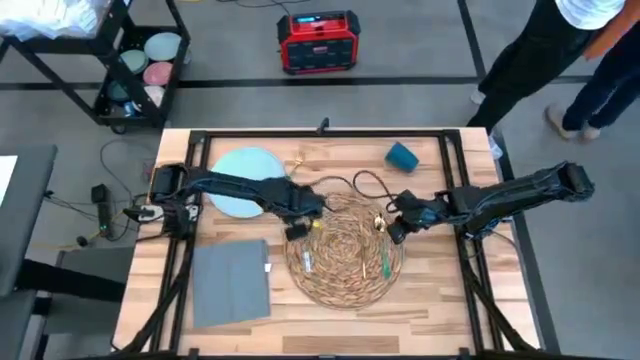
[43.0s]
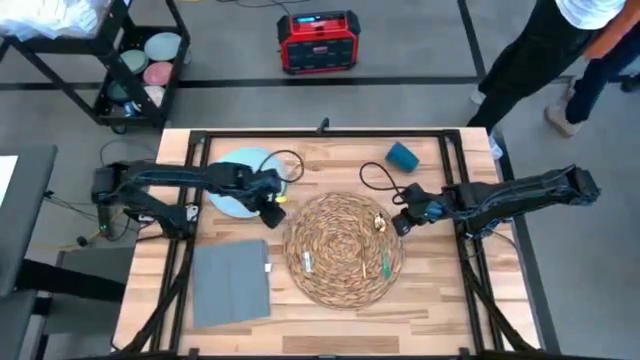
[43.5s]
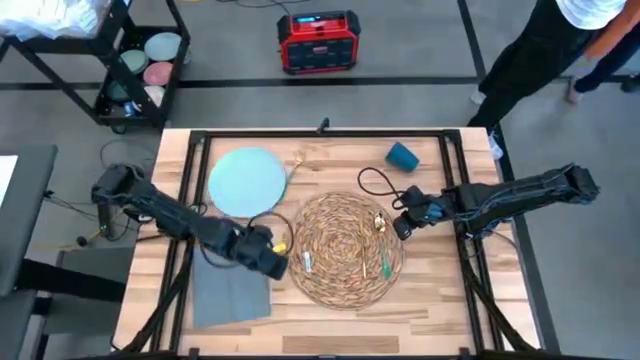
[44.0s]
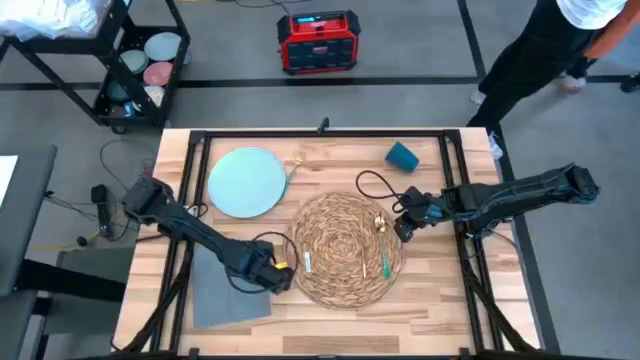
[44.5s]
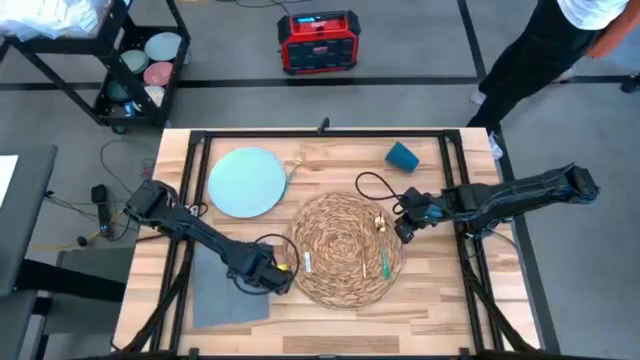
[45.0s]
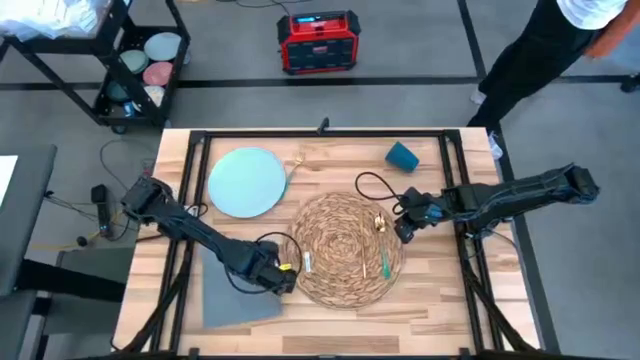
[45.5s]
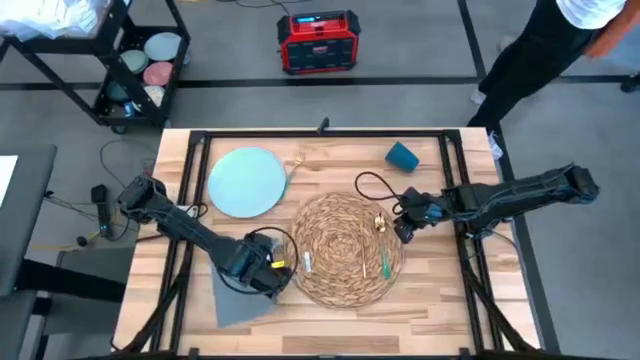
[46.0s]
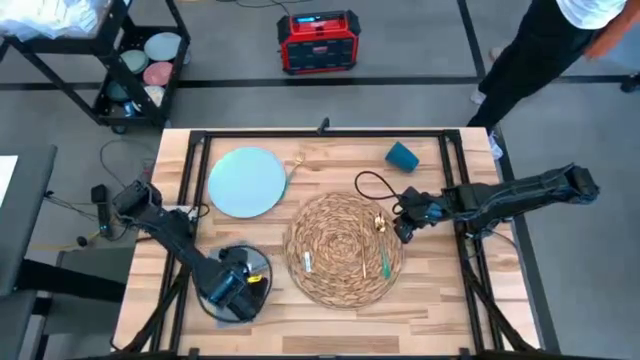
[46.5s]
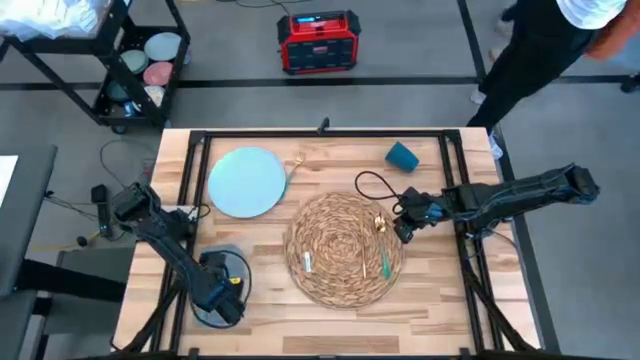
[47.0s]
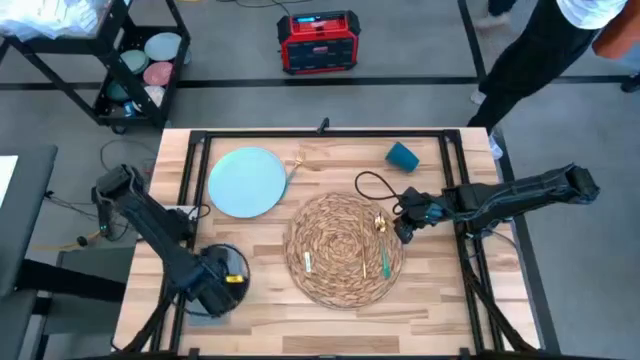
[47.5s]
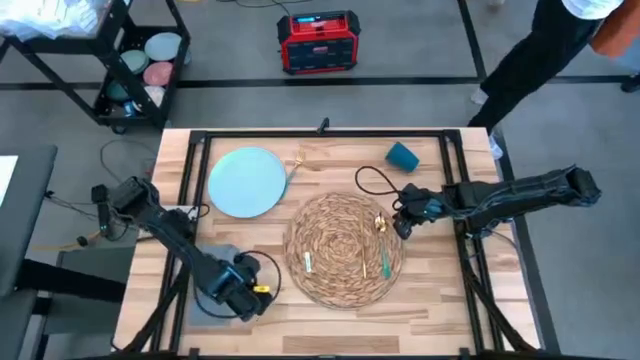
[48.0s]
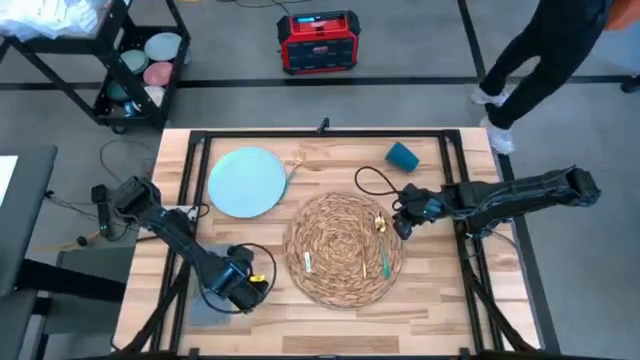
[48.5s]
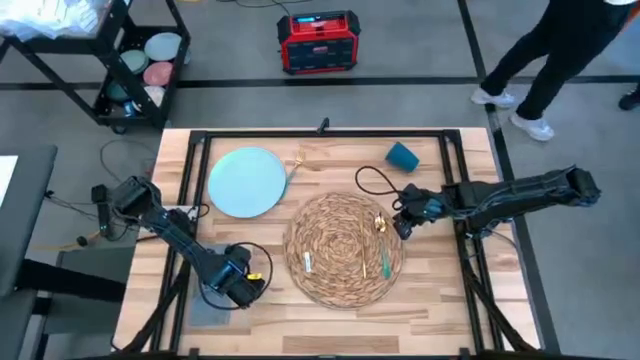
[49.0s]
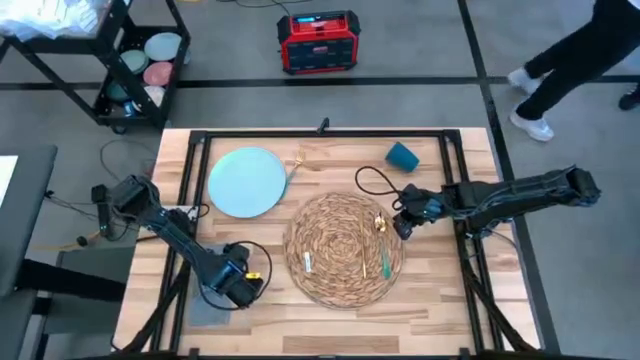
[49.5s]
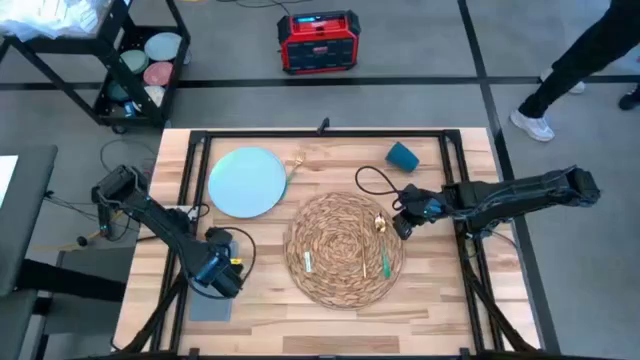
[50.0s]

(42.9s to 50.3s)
Task: Set table place
Fold the gray table napkin

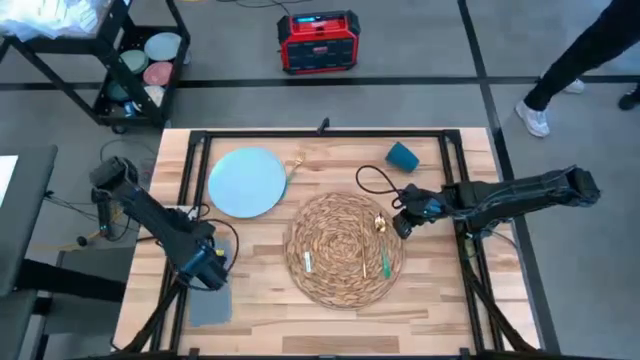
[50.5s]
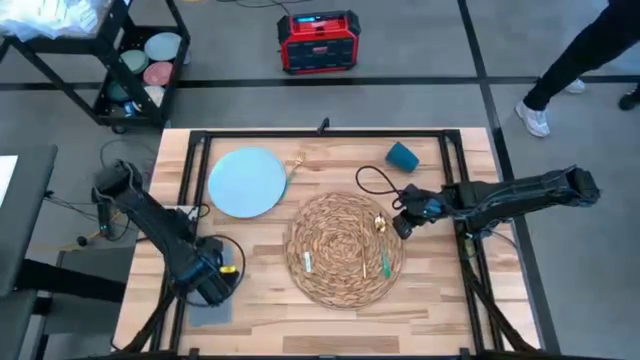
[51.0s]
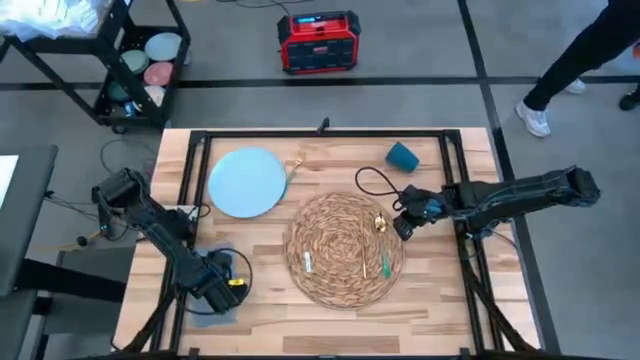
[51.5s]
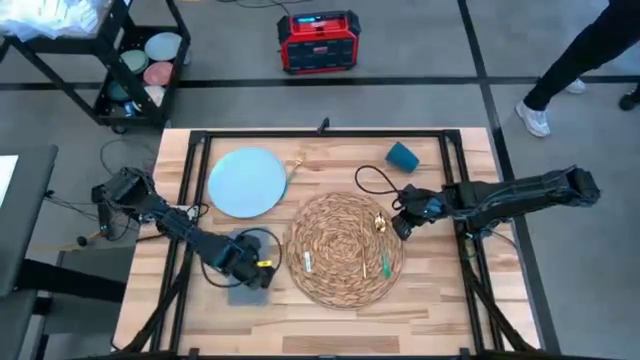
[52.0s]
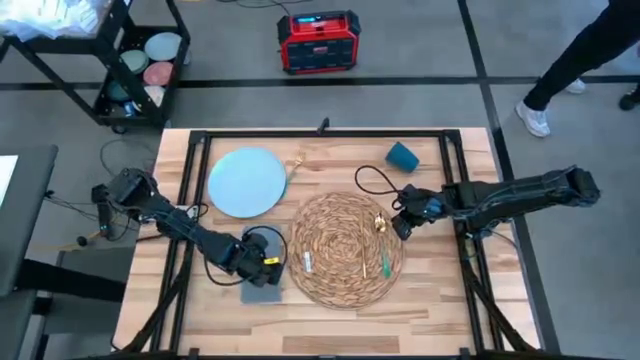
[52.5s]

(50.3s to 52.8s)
Move the table napkin to the left of the brown woven placemat

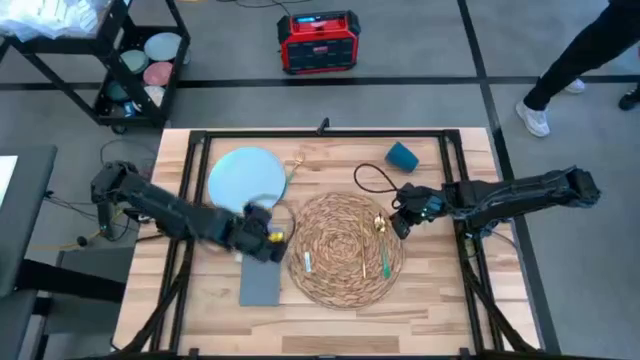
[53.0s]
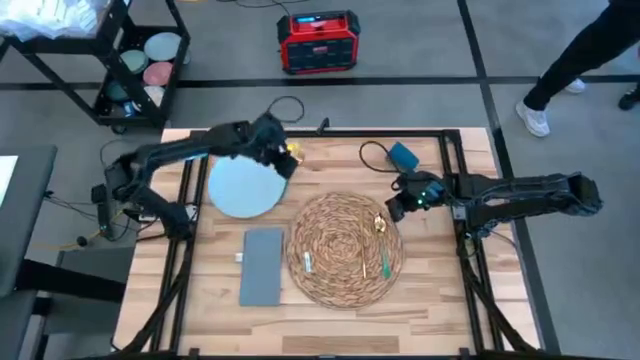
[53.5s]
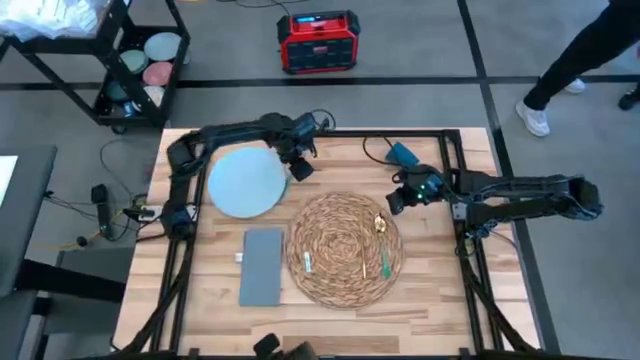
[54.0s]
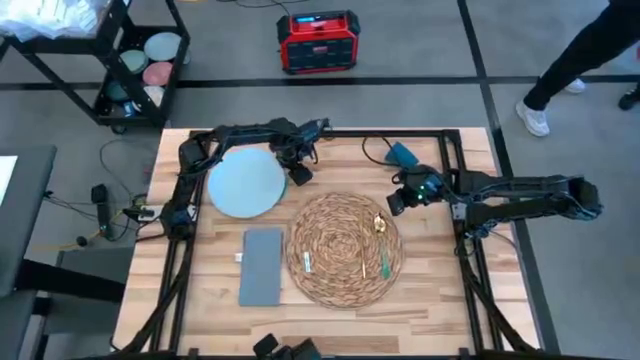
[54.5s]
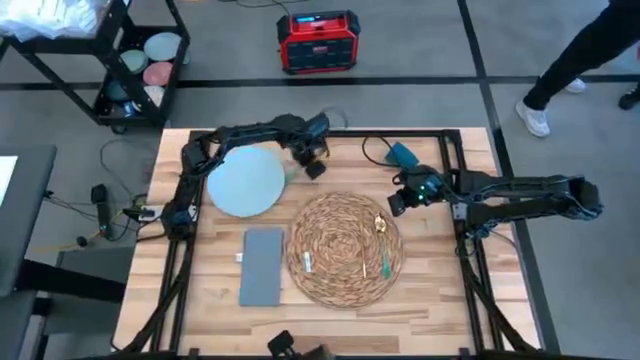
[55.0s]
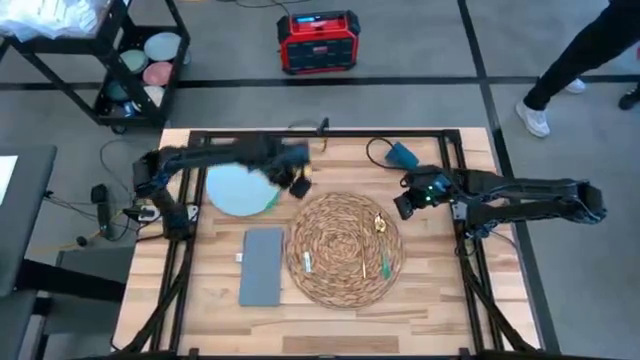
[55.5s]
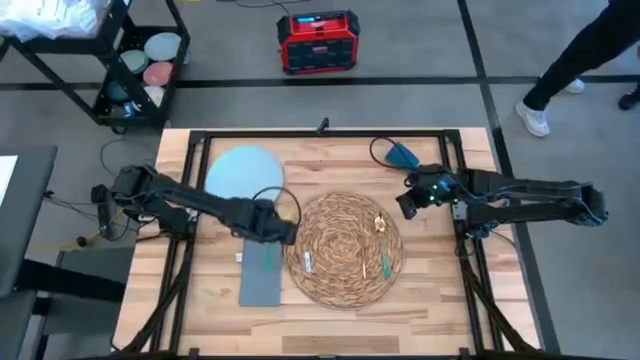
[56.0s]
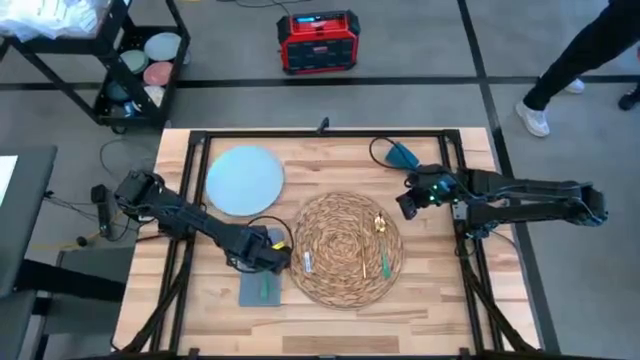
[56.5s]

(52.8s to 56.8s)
Put the green fork on the gray table napkin

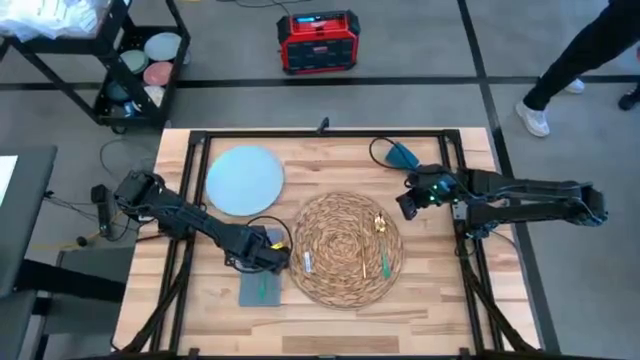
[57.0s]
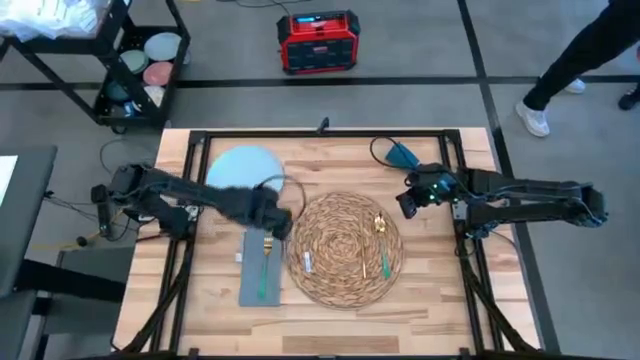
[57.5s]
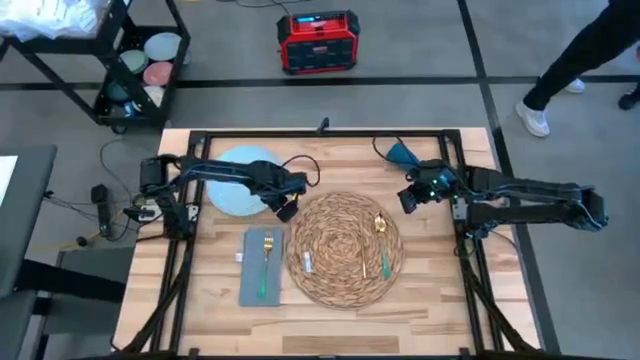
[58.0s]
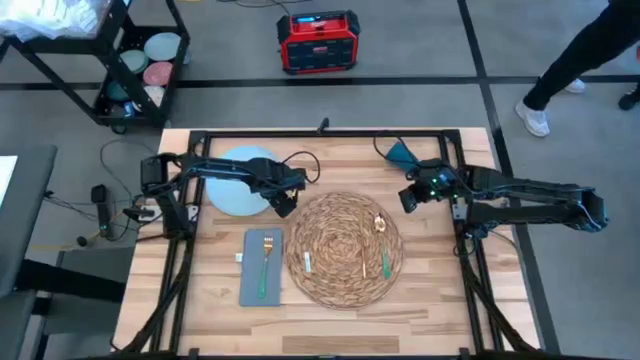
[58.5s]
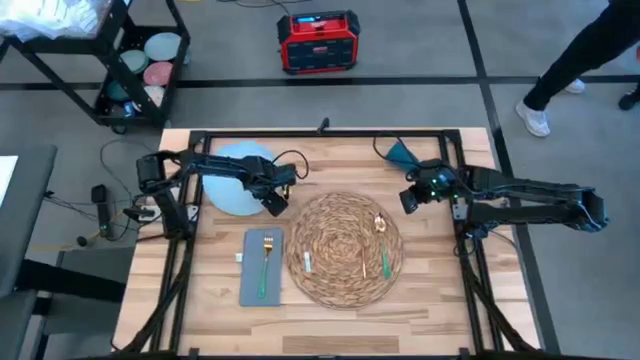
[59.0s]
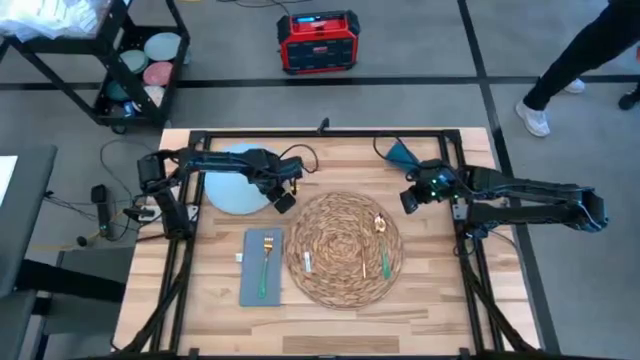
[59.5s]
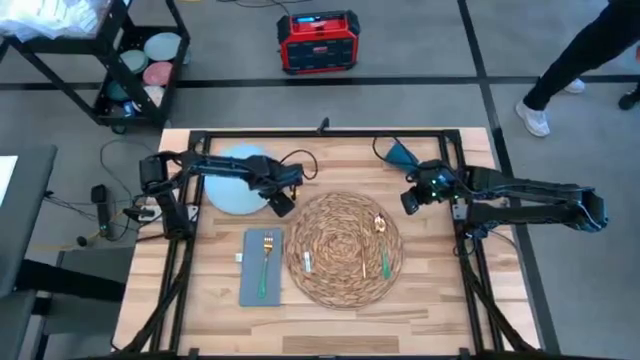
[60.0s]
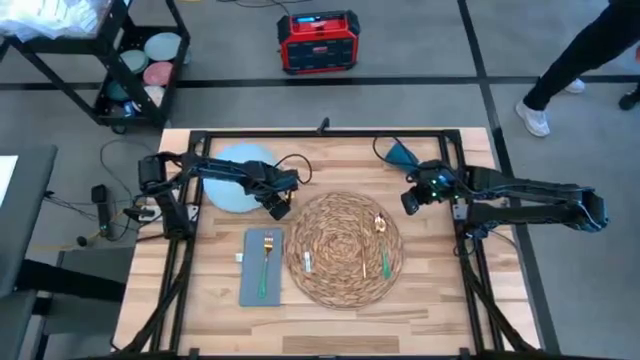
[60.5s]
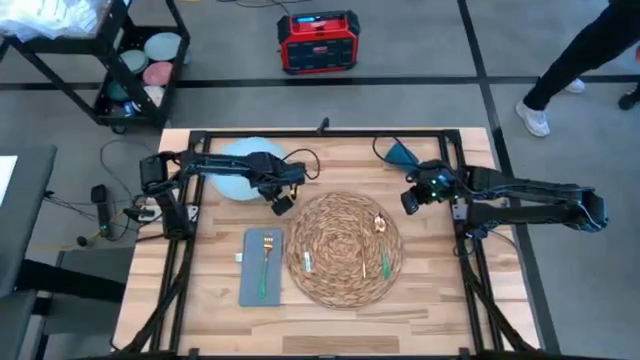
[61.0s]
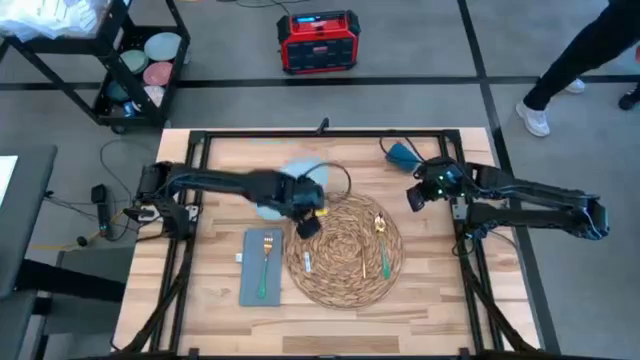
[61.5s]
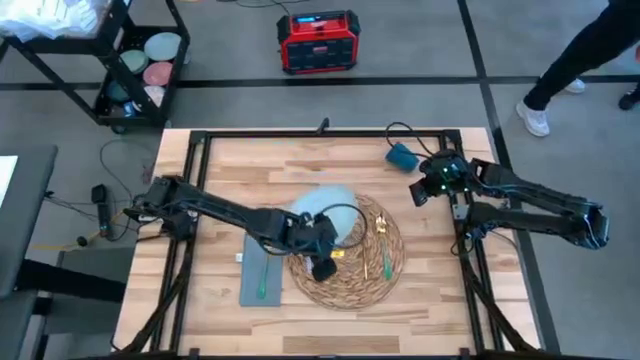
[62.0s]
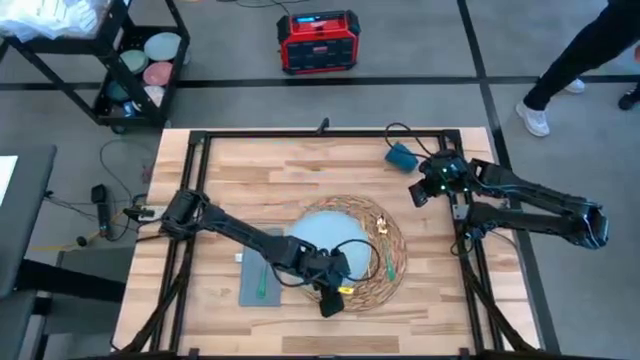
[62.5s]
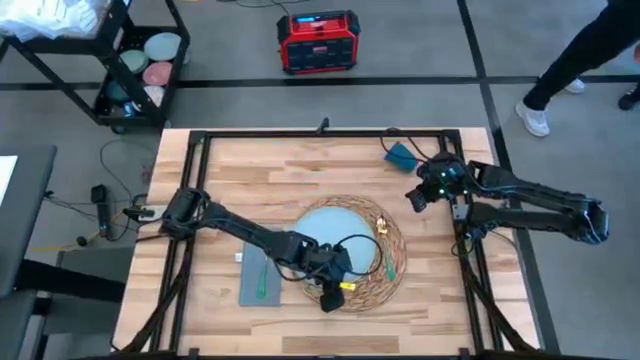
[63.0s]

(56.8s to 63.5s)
Put the light blue plate on the brown woven placemat

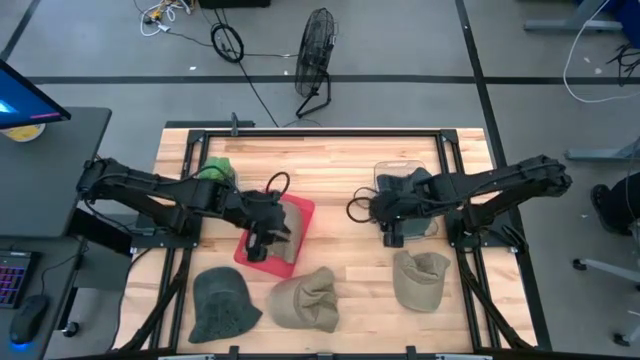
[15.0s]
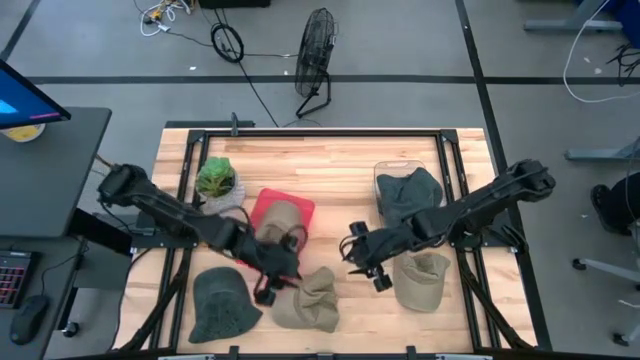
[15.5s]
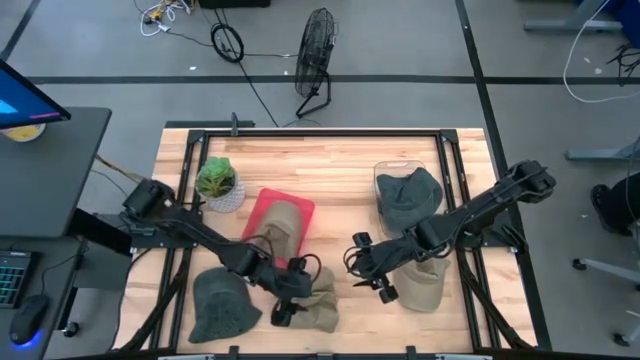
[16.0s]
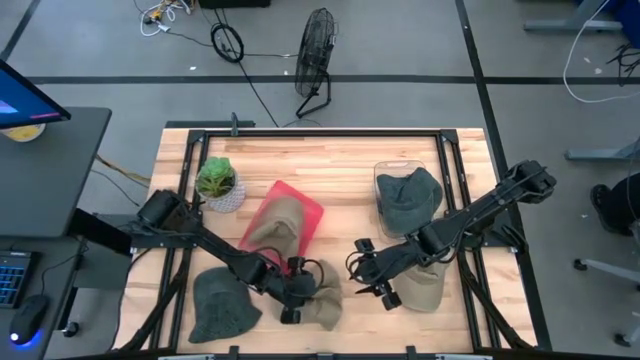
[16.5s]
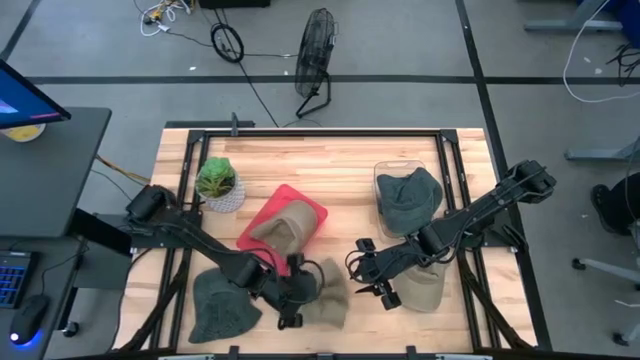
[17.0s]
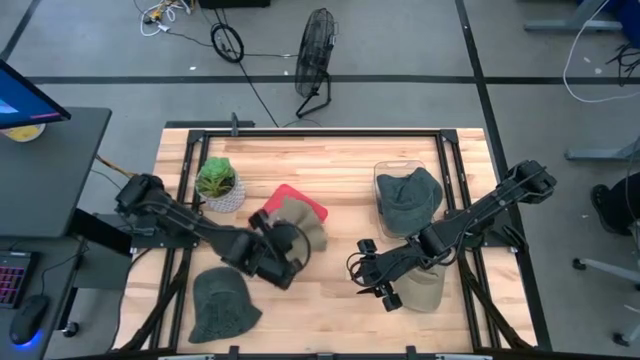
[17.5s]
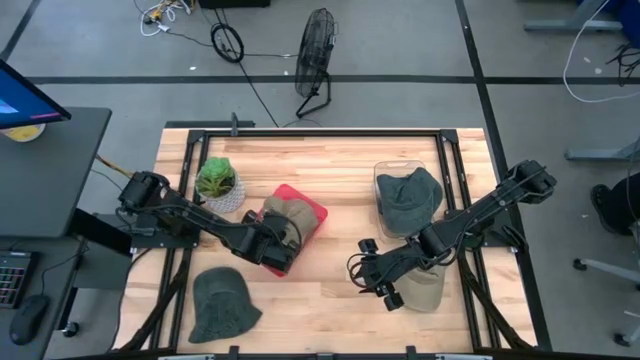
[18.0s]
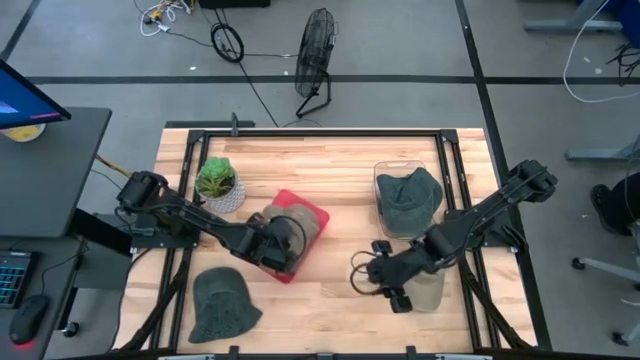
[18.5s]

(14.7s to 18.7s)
Task: Pick & Place hat
Put the left brown cap into the red bin
